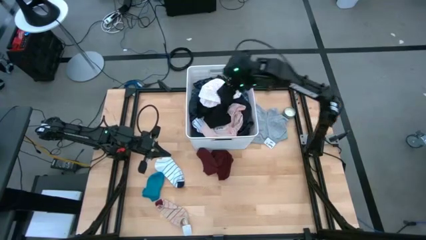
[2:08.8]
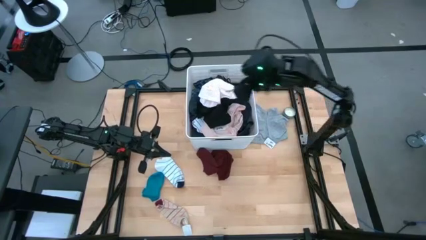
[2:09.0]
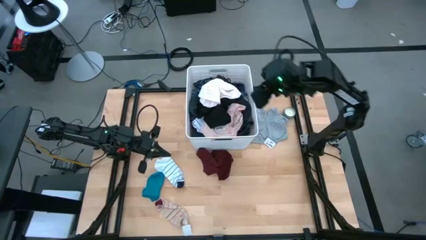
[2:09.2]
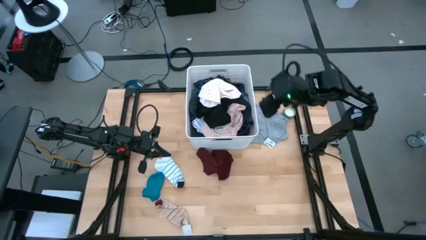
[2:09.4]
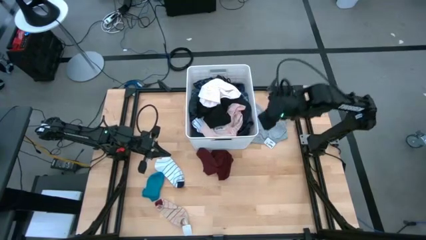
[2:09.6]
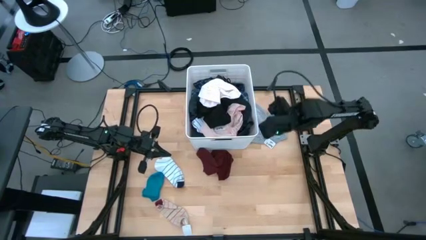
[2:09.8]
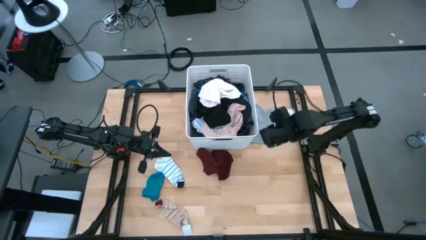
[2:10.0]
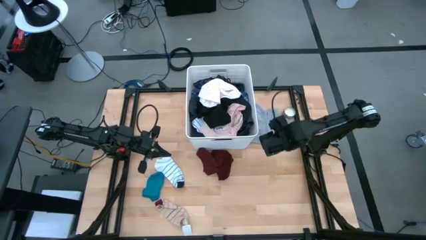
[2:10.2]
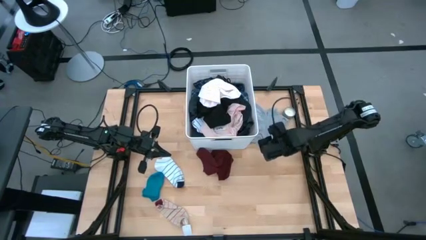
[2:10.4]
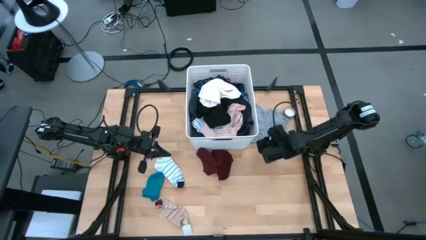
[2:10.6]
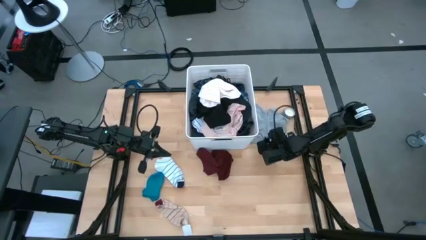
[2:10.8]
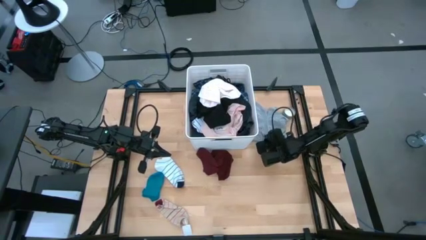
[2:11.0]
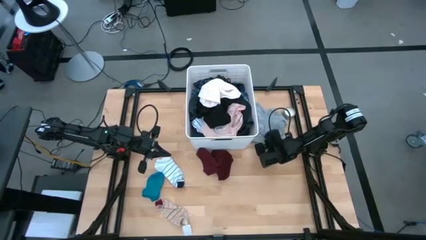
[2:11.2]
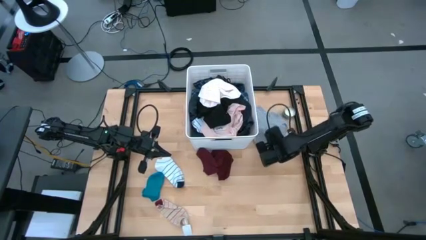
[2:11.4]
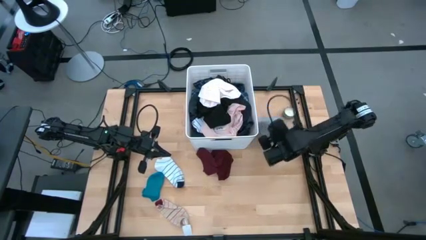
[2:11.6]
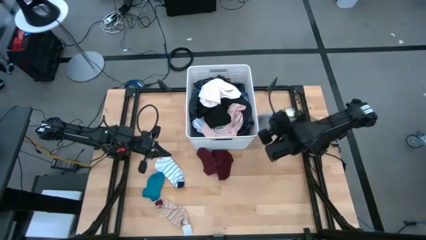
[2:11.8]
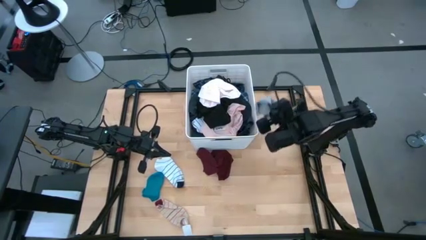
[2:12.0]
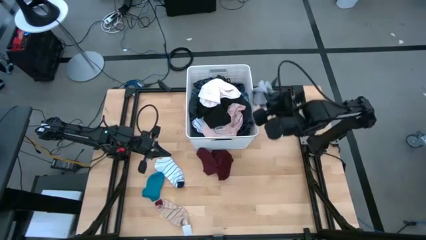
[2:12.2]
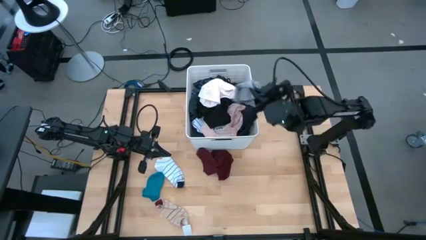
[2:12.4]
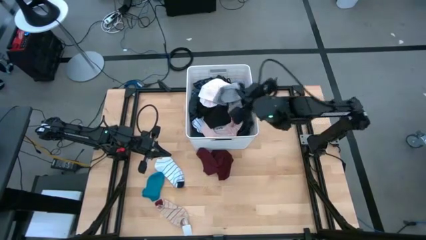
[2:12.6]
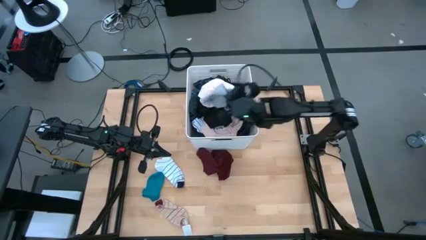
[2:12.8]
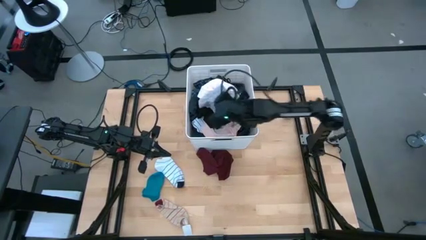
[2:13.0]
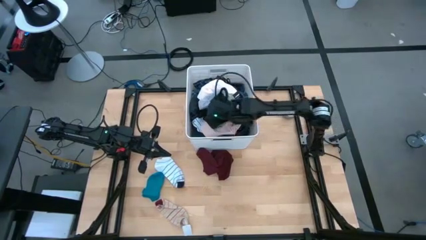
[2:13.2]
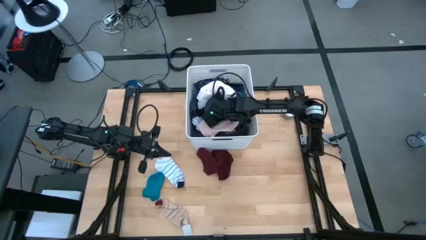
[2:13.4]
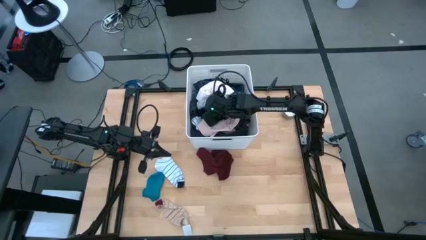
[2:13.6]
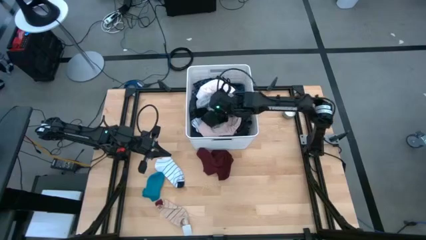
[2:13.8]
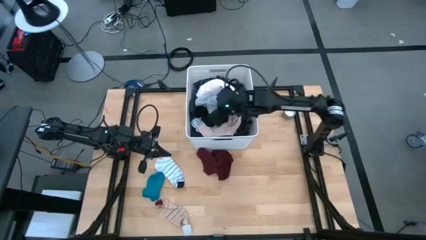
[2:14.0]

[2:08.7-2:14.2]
Task: Sort clothes
Put the gray boxer into the laundry bin

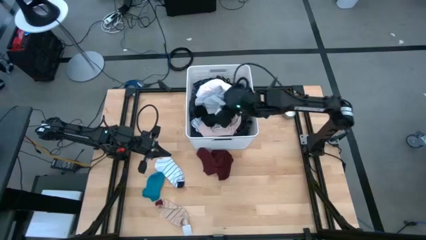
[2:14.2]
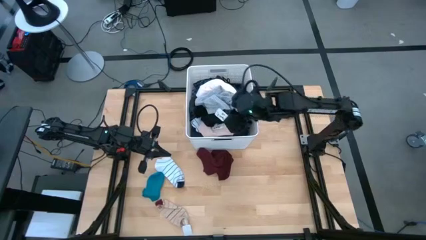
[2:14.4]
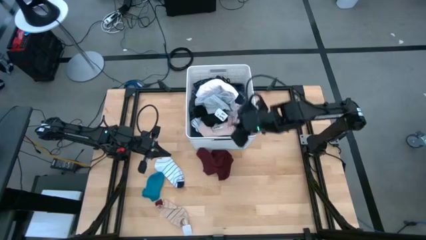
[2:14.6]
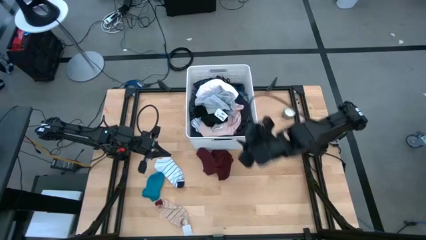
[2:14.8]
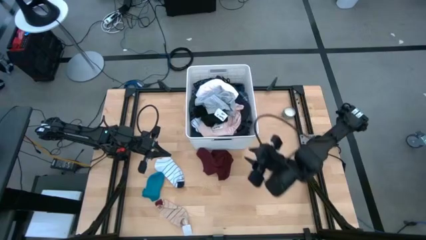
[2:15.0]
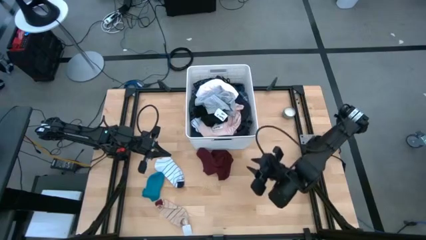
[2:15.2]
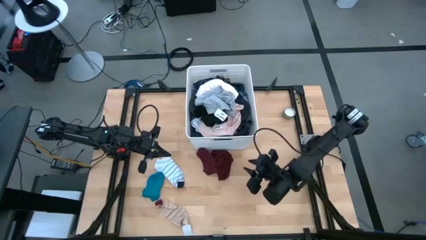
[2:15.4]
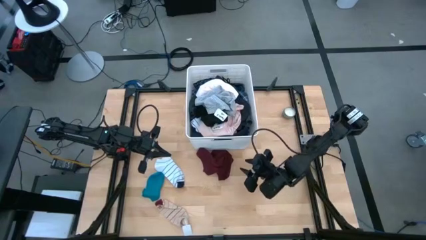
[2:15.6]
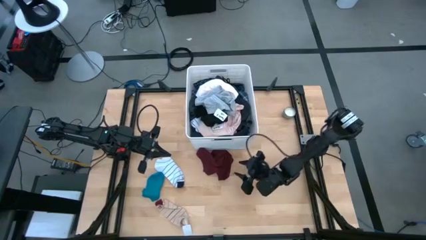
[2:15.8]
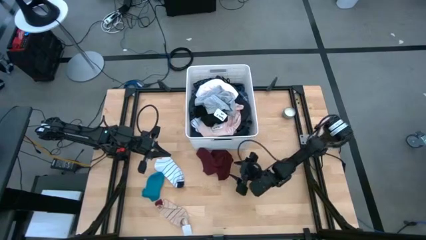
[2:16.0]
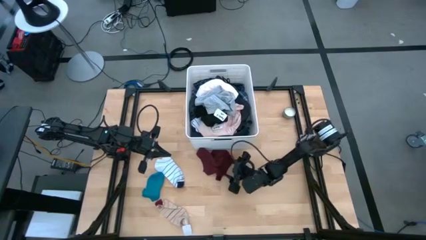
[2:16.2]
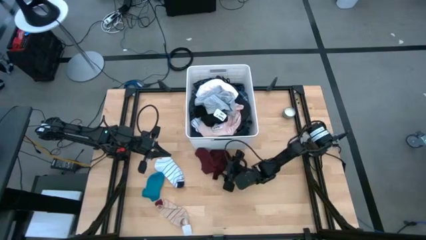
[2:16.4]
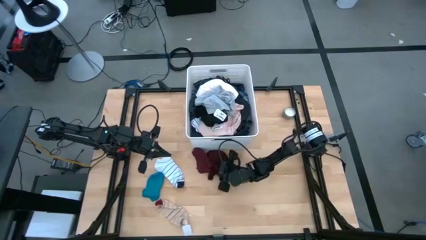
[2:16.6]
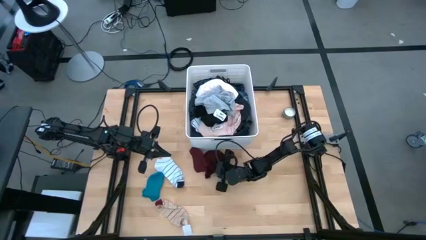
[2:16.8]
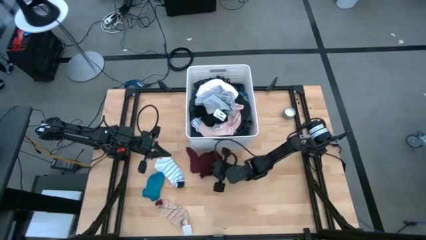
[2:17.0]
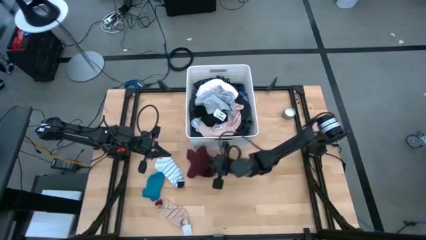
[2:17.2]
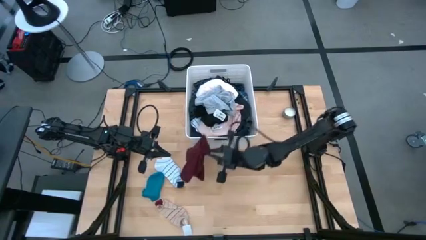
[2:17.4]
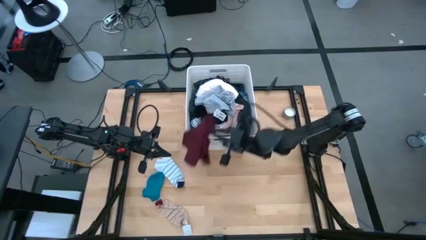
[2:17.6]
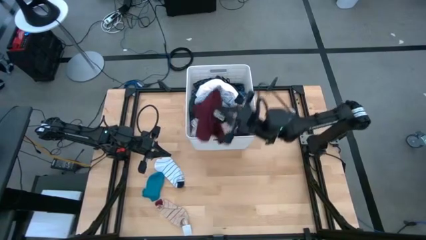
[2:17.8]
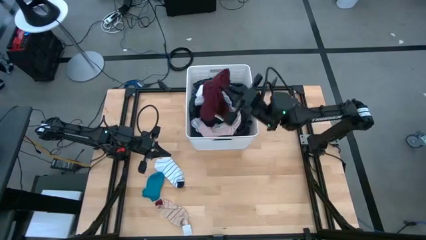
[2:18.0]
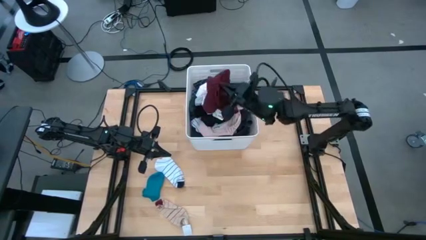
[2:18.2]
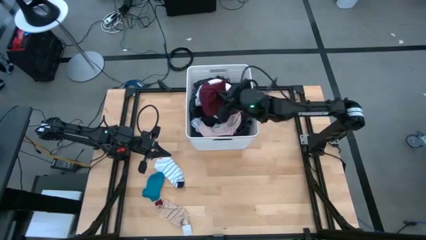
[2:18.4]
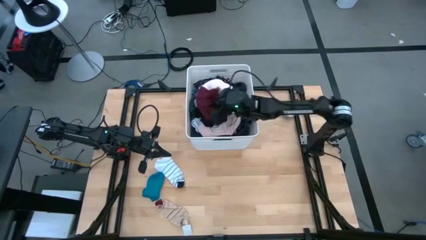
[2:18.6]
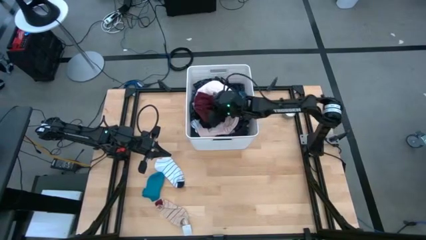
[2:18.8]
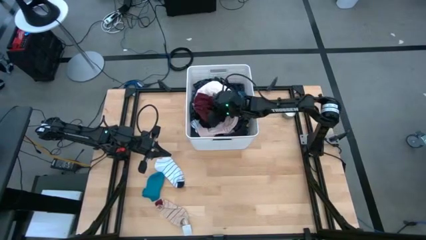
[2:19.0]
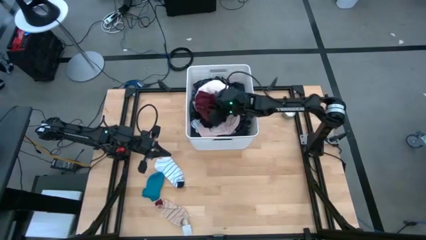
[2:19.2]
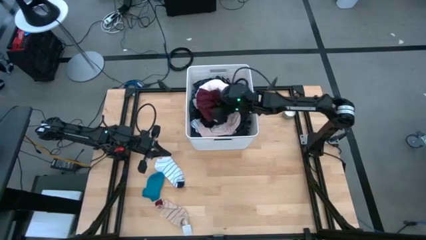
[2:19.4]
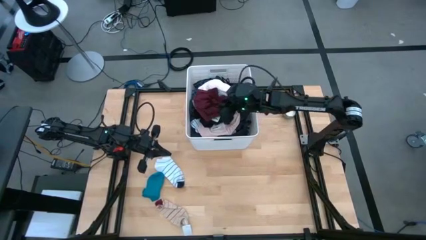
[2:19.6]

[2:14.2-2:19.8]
Put the dark red underwear into the laundry bin

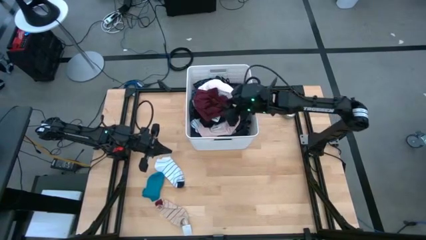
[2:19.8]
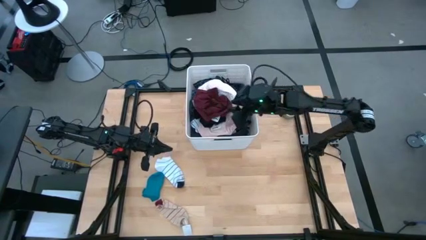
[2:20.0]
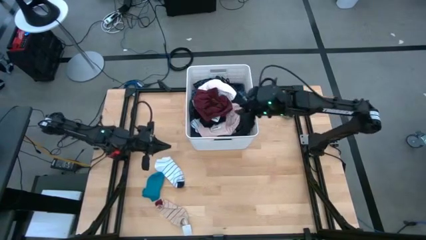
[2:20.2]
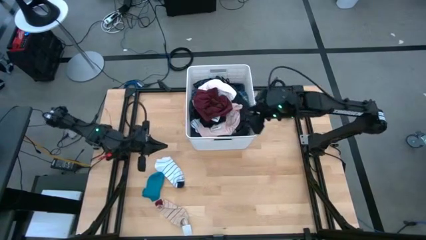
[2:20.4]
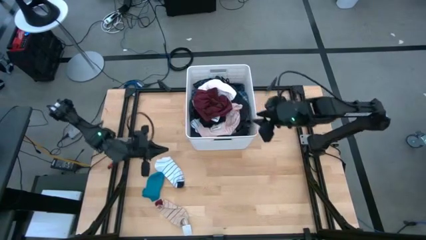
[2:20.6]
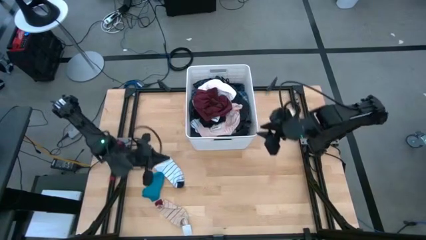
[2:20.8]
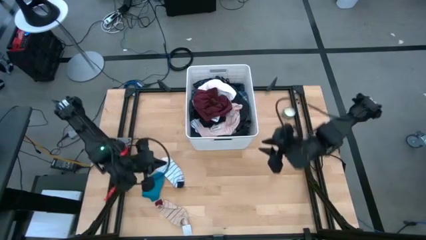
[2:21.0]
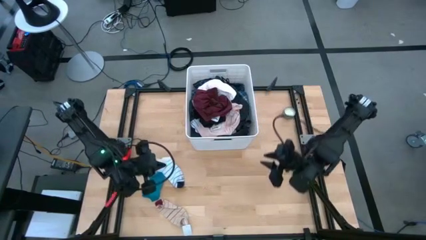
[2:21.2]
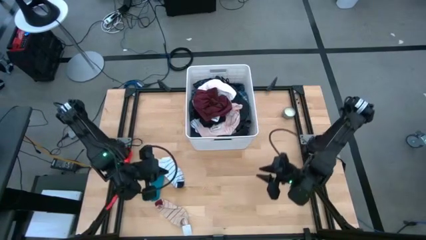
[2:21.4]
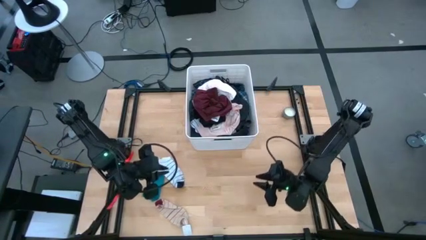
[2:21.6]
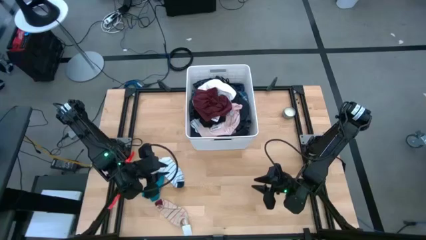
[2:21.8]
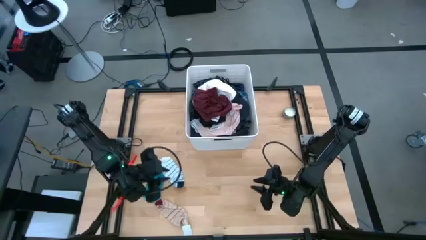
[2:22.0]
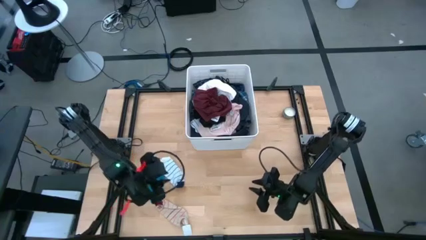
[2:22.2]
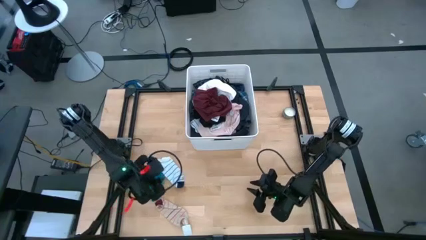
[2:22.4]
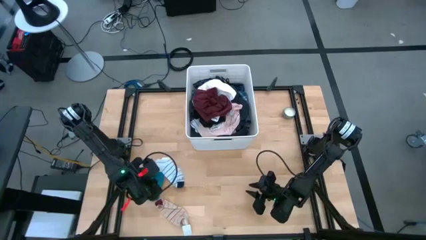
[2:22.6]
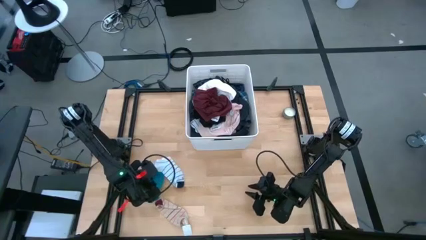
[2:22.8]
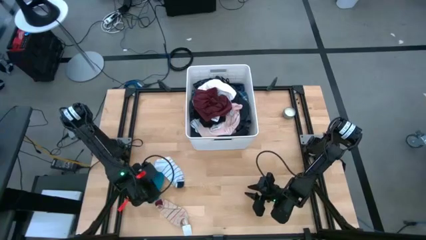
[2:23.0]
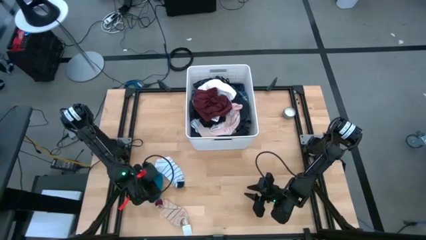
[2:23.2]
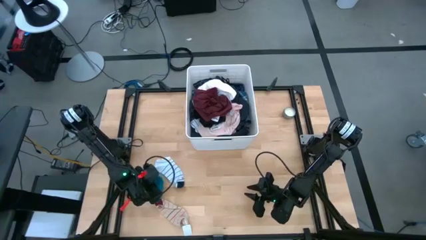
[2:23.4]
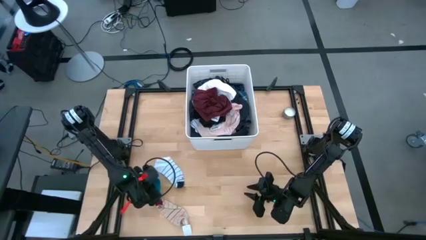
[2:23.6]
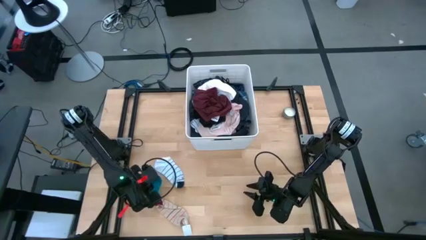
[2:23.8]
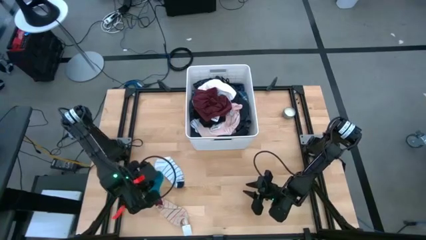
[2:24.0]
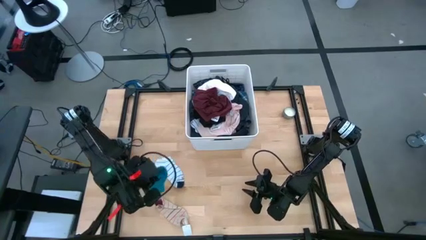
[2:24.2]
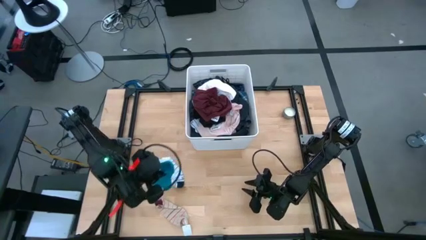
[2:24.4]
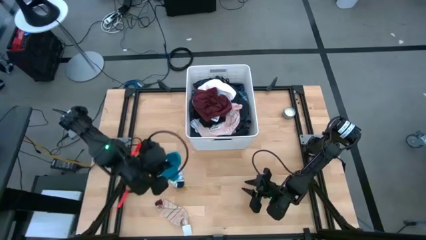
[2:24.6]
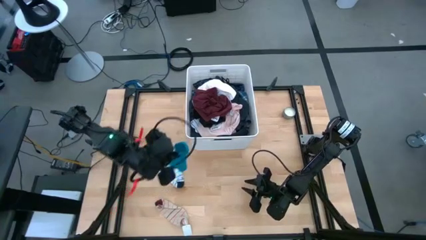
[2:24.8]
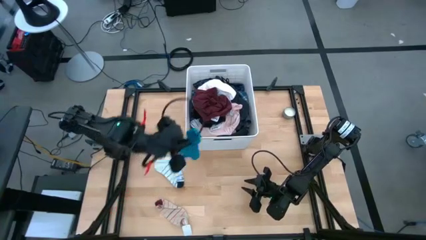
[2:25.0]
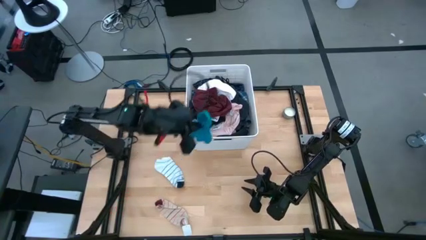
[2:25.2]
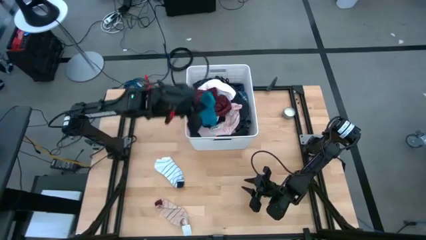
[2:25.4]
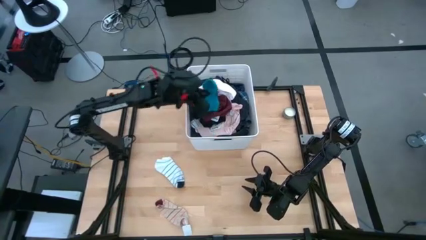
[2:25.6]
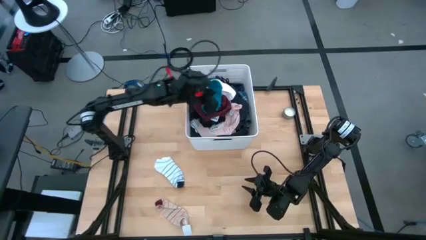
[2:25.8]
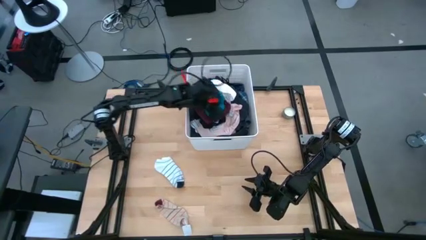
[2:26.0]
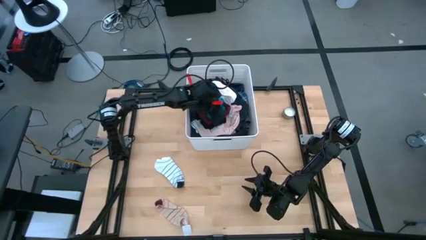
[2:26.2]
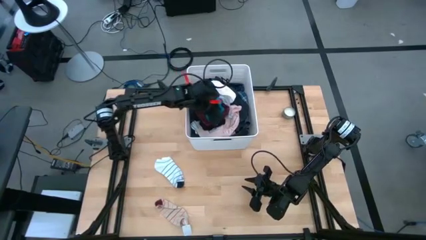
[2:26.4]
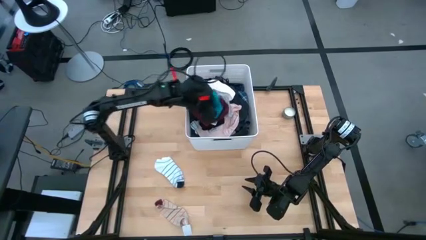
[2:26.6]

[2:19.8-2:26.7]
Put the sky blue sock into the laundry bin
